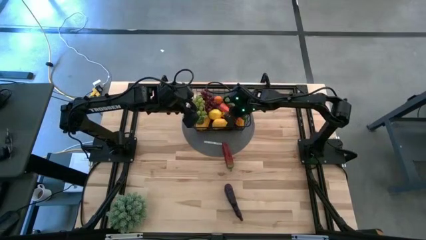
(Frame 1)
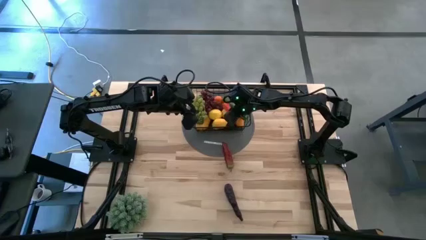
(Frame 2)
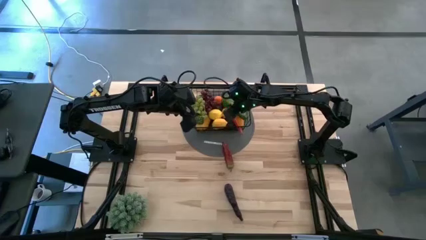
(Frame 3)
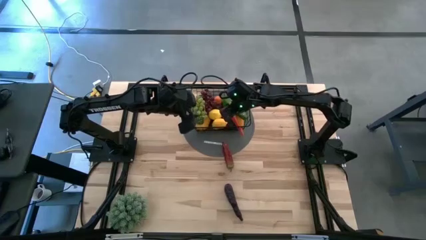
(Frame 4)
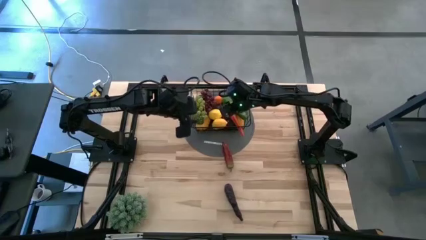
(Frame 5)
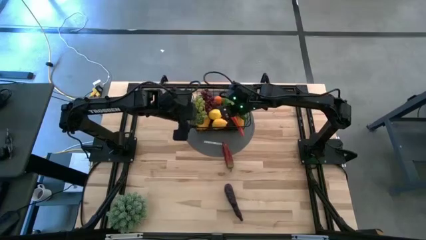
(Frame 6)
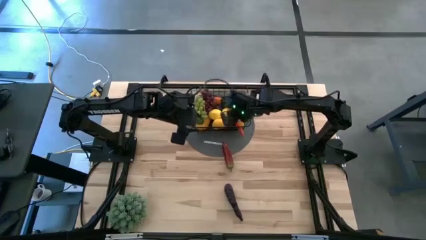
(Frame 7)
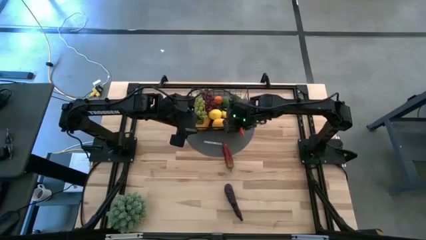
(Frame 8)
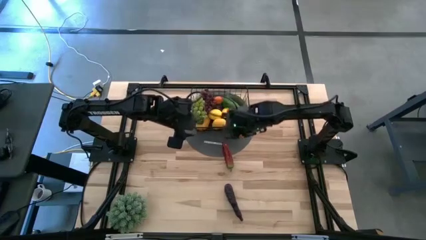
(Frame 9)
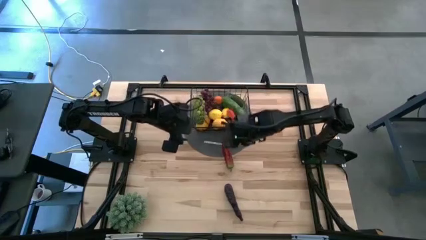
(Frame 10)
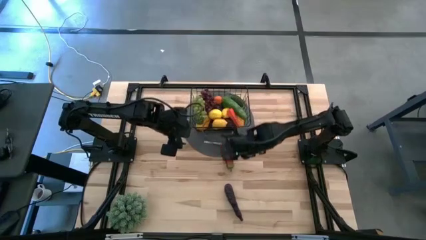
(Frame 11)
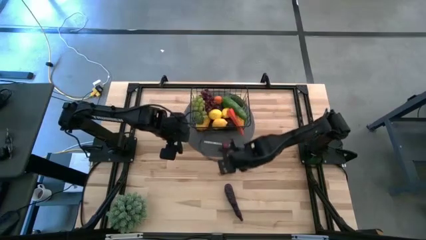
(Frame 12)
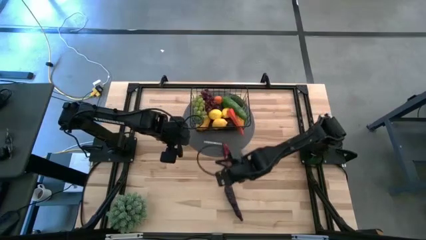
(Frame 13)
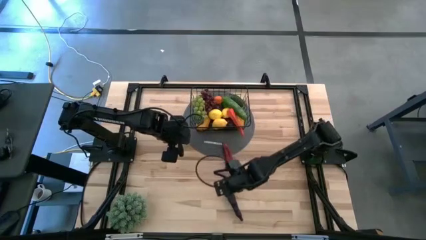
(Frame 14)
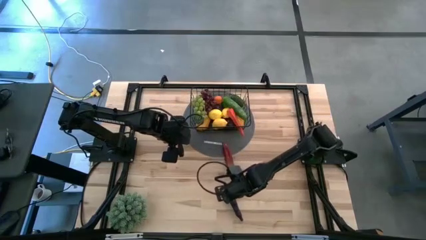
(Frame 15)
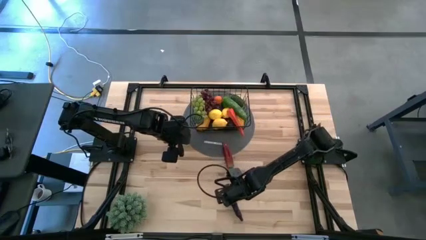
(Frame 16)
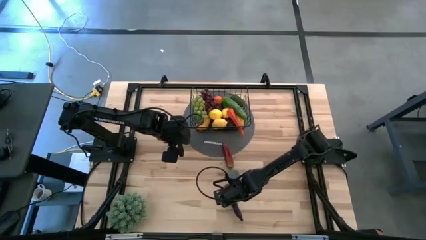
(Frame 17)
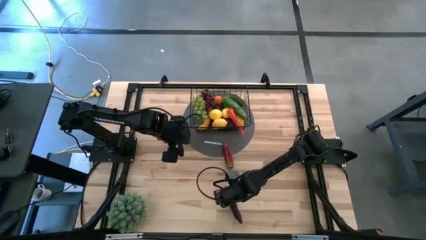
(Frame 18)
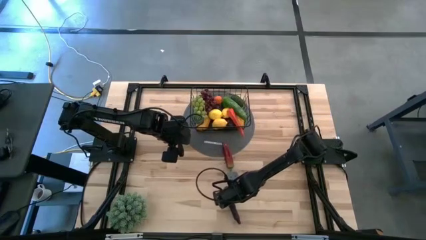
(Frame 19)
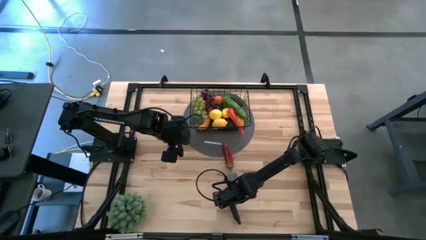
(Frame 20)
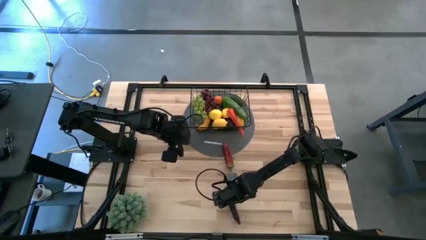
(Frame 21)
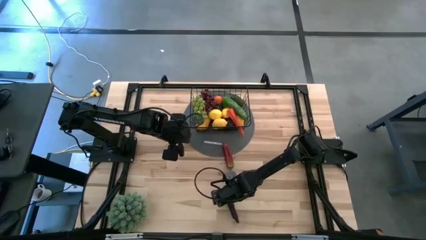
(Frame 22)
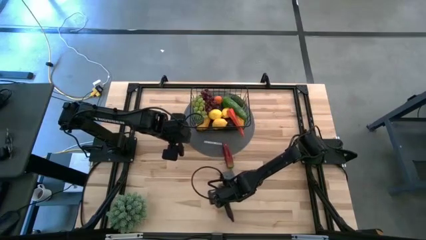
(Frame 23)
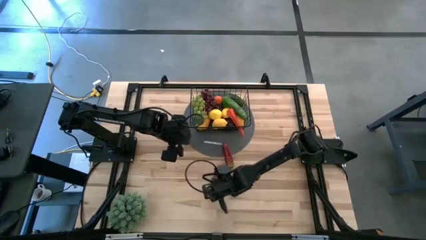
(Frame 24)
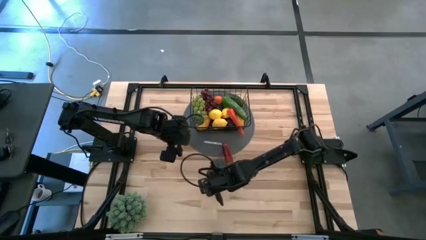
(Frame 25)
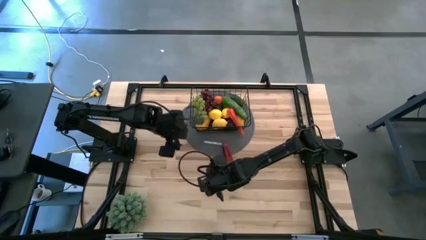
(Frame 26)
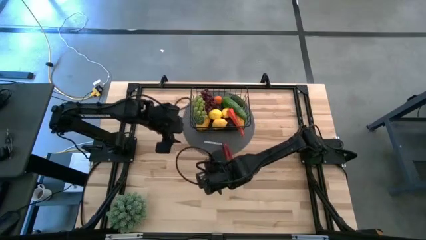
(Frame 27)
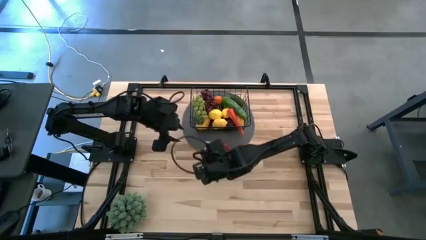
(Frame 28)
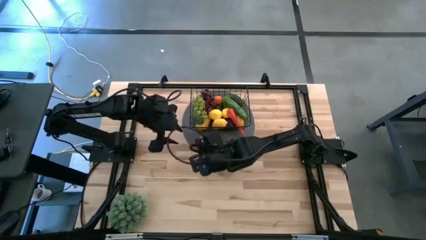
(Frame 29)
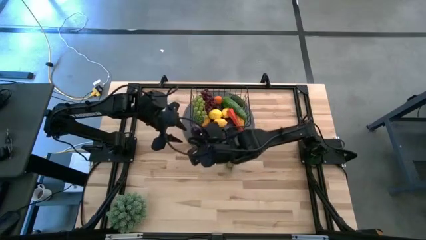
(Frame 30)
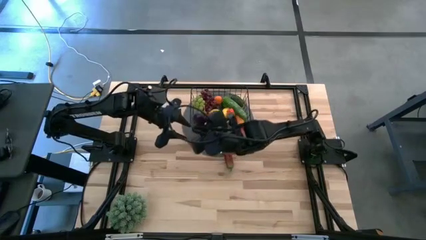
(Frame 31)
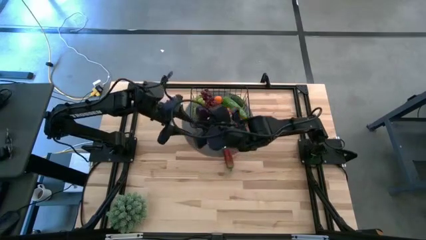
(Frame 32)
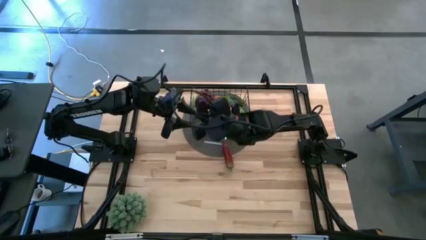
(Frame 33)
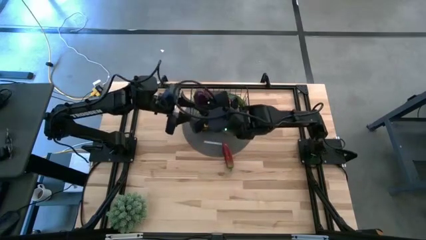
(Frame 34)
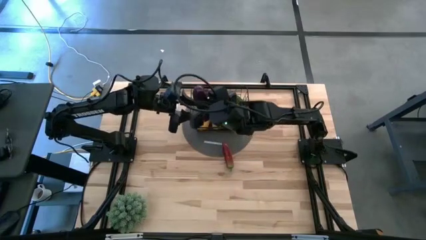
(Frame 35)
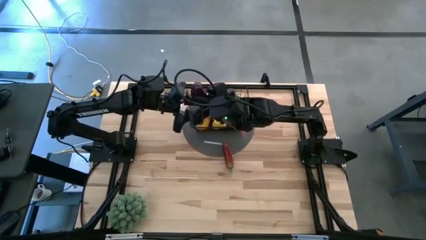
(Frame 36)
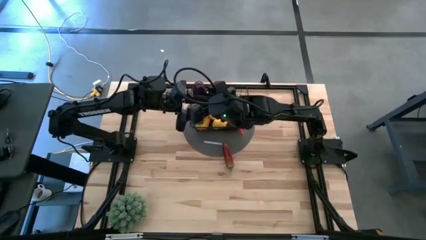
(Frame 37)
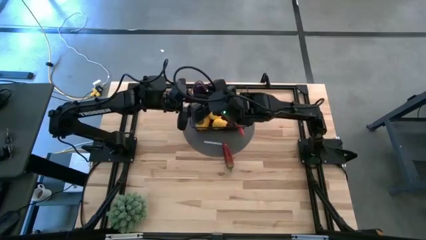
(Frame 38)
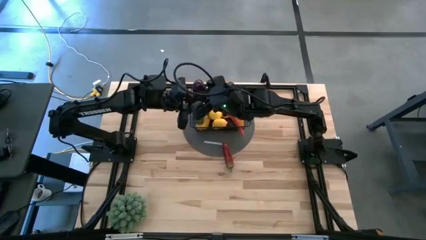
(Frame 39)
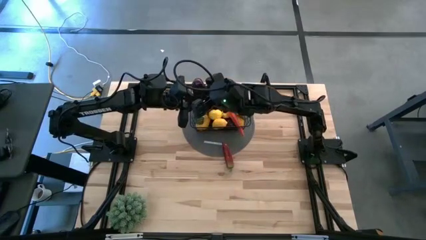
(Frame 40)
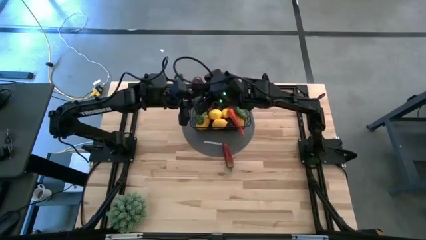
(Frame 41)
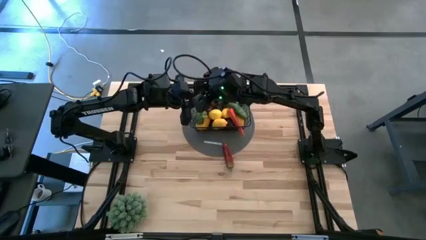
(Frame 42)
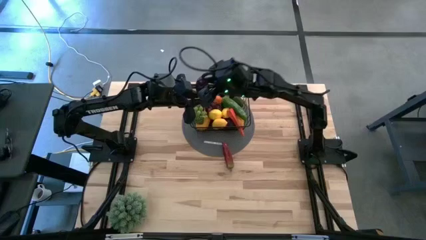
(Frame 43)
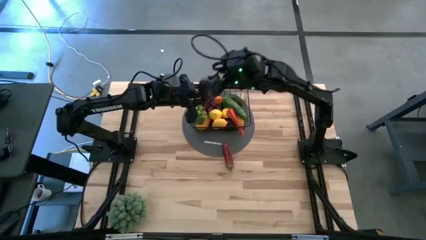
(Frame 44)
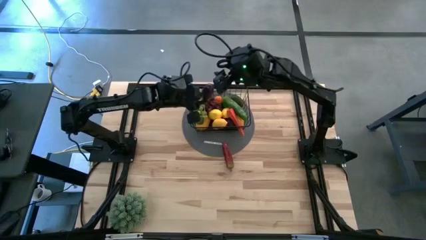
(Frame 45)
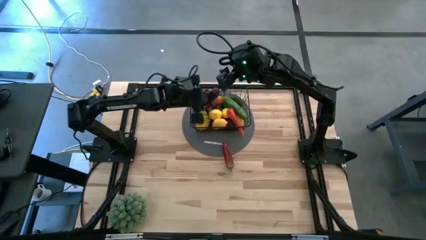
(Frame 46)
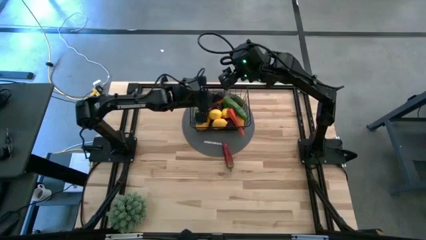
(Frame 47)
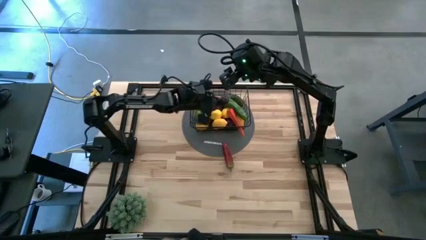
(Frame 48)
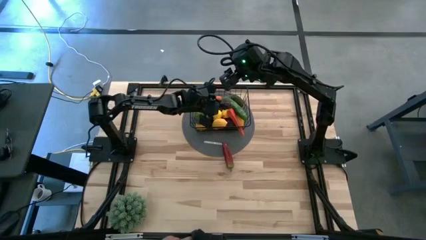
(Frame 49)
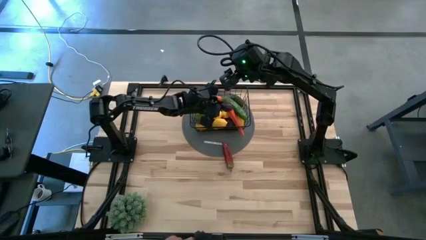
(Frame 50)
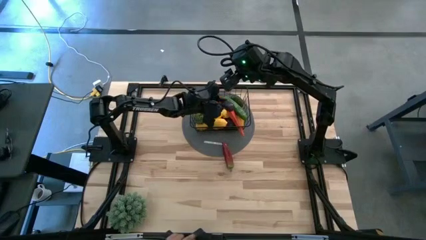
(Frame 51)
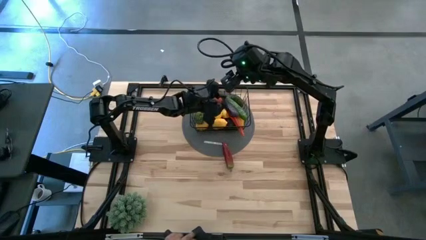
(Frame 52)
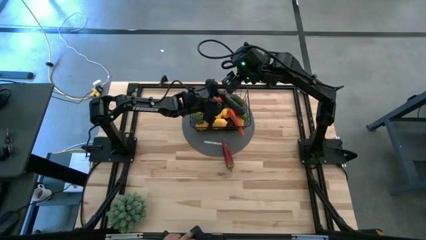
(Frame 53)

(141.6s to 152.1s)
Task: Build produce basket
Put the violet eggplant into the black wire basket

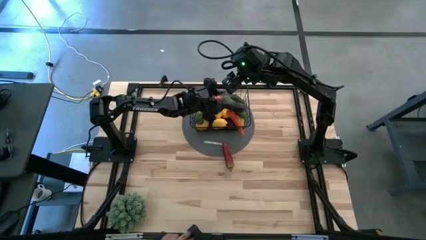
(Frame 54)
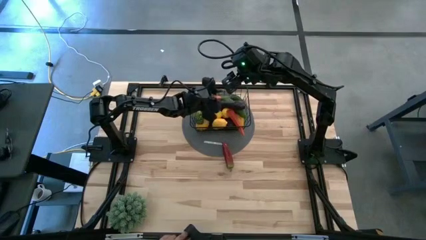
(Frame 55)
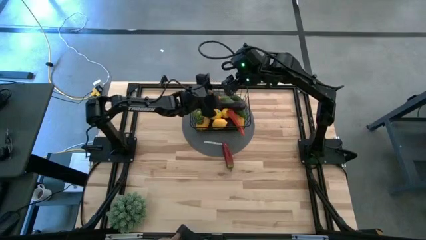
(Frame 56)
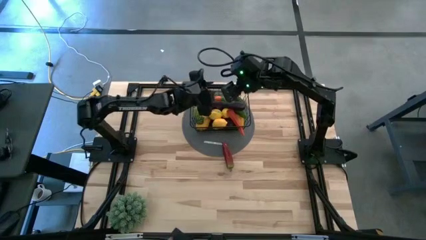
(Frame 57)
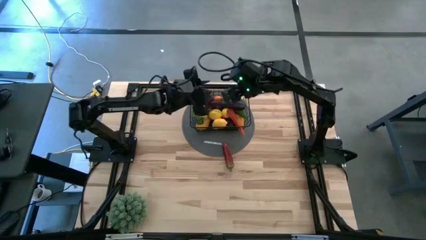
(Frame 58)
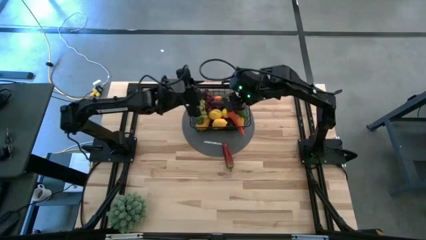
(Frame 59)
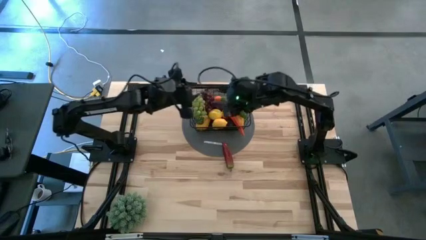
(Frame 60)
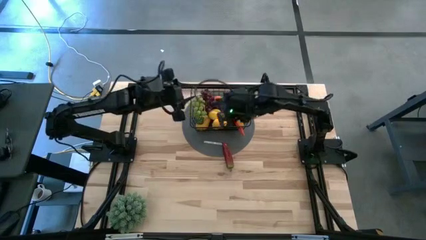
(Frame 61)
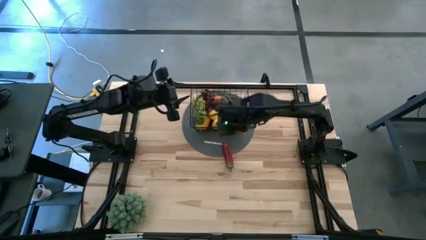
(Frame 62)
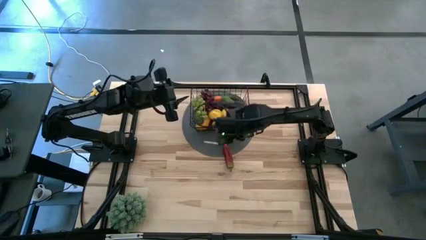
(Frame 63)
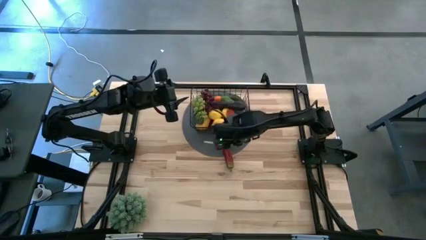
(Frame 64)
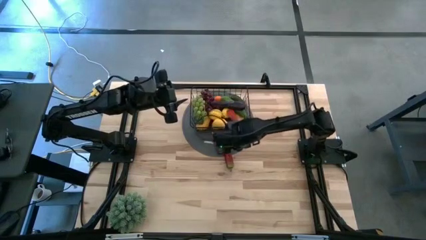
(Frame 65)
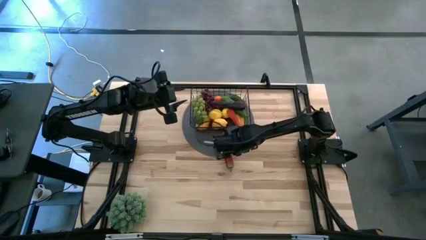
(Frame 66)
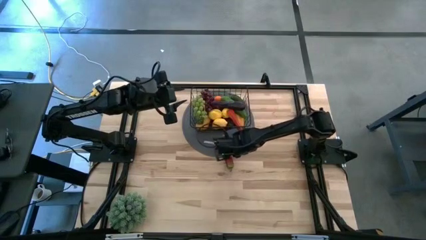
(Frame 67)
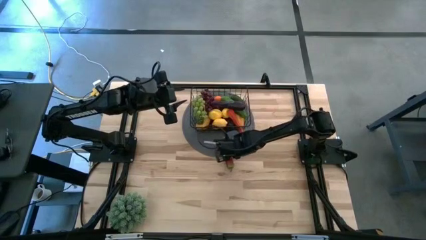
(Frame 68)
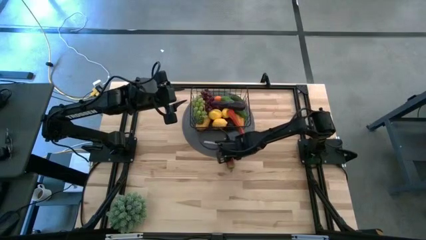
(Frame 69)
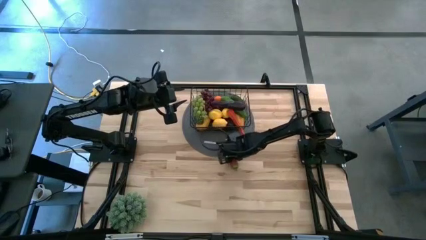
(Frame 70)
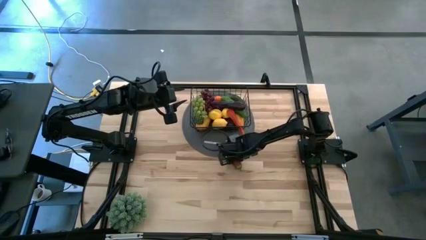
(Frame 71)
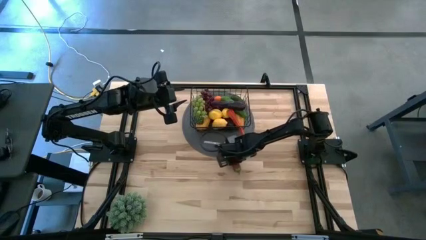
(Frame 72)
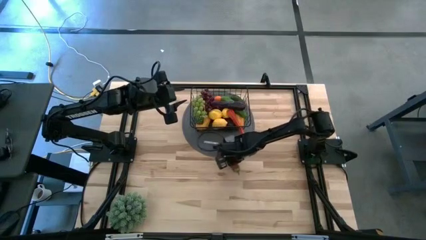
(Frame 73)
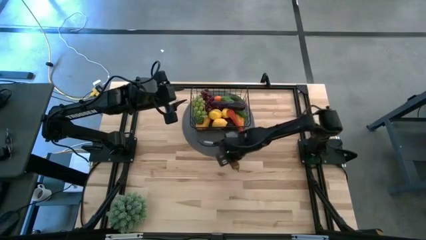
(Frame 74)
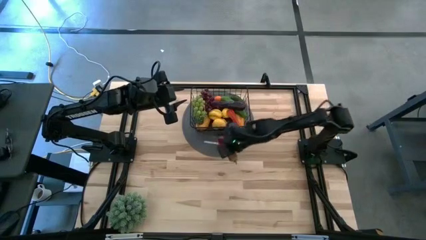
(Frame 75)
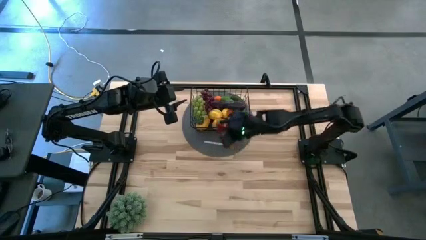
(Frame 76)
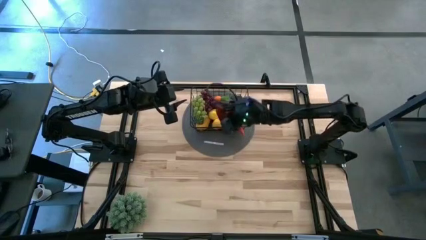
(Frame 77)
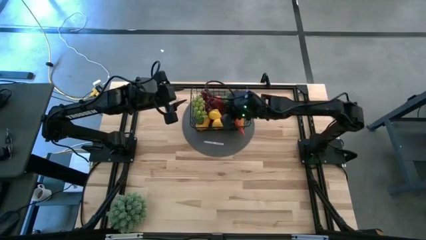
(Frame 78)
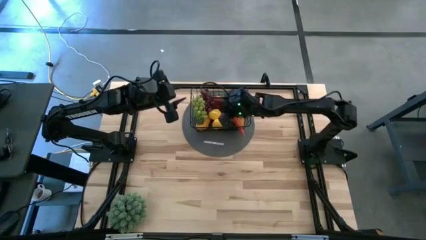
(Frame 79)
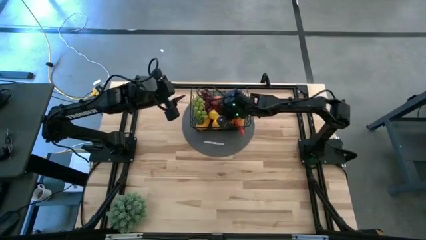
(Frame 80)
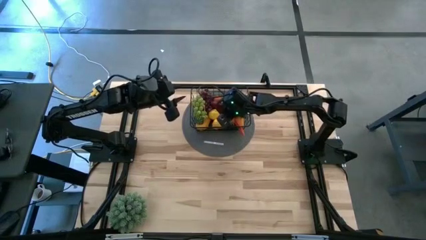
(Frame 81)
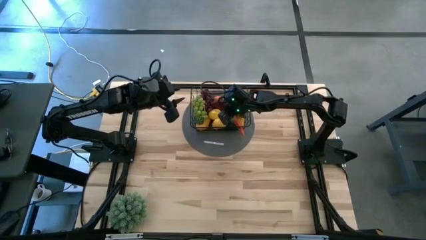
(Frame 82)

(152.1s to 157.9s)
Put the red chili pepper into the black wire basket
